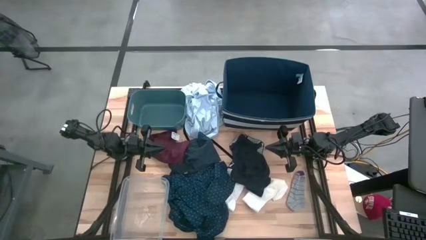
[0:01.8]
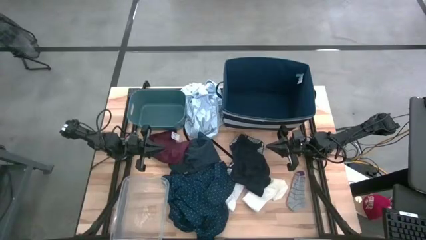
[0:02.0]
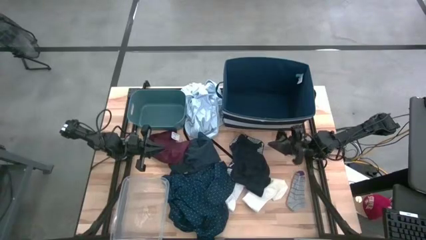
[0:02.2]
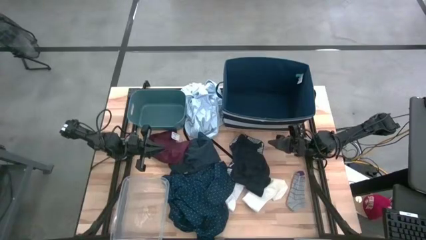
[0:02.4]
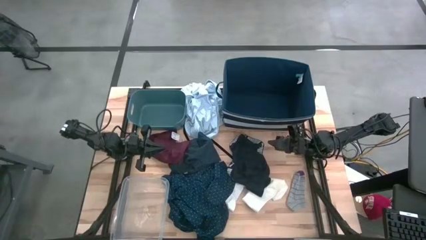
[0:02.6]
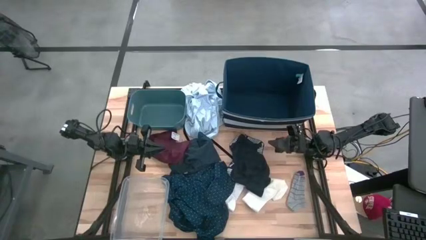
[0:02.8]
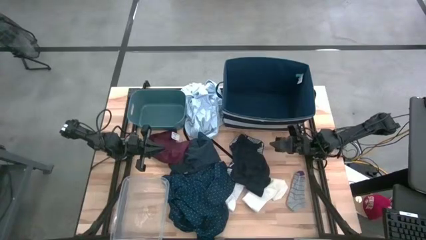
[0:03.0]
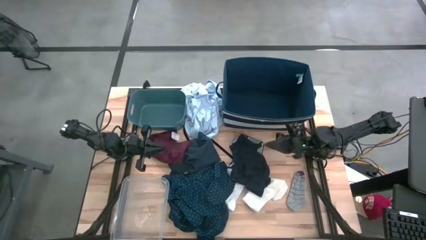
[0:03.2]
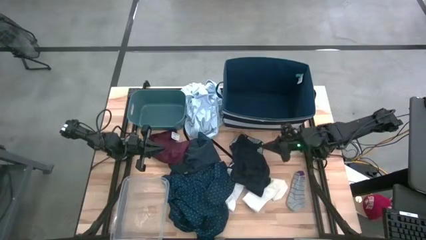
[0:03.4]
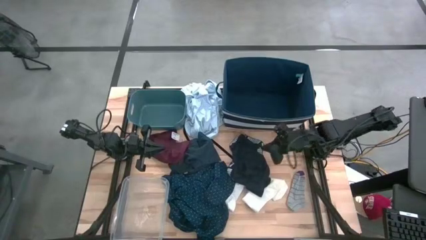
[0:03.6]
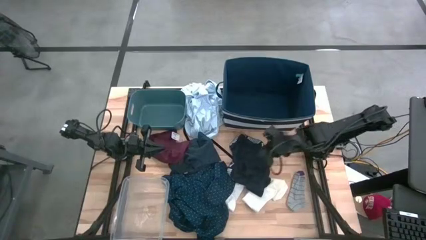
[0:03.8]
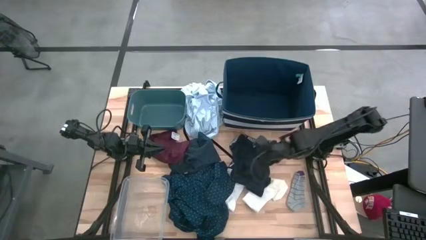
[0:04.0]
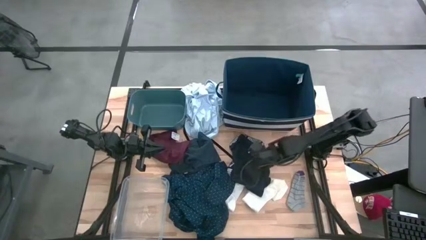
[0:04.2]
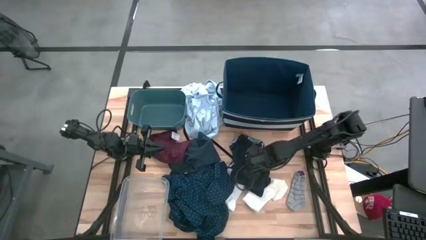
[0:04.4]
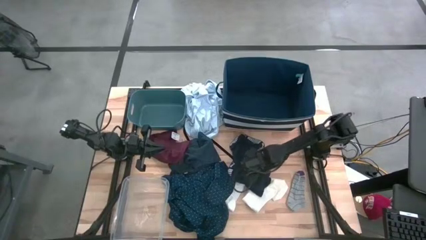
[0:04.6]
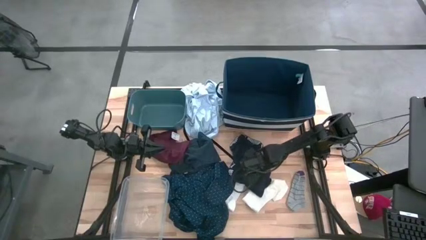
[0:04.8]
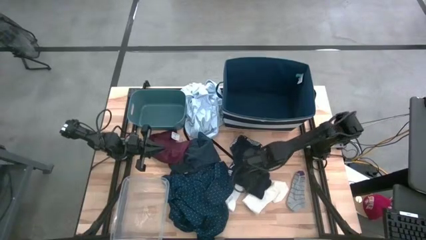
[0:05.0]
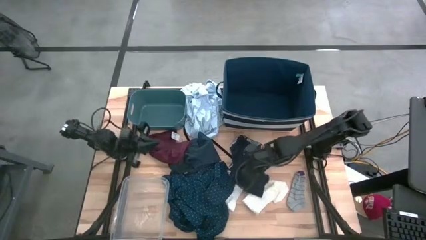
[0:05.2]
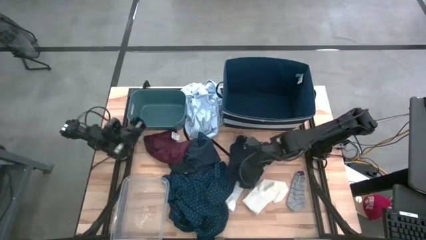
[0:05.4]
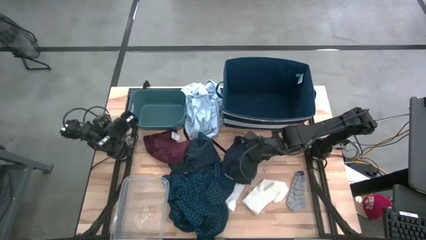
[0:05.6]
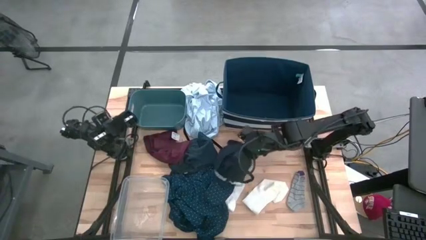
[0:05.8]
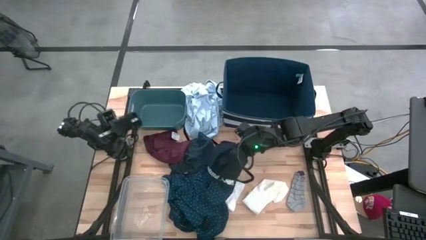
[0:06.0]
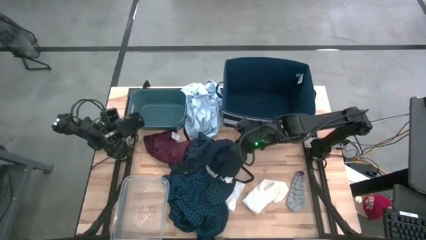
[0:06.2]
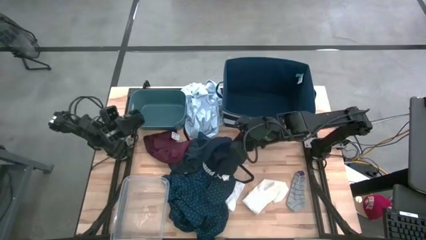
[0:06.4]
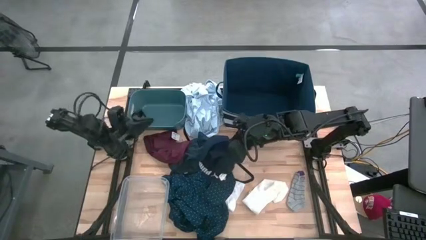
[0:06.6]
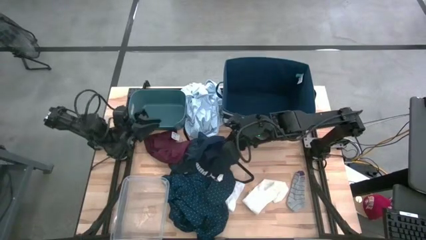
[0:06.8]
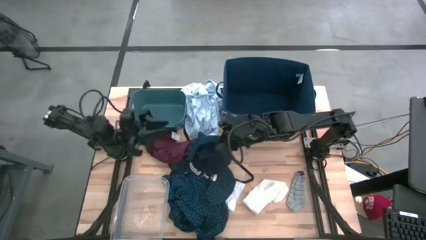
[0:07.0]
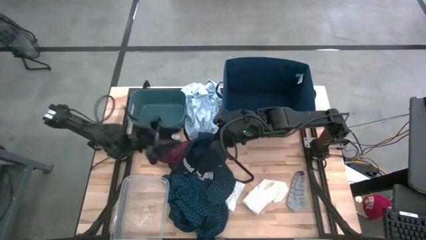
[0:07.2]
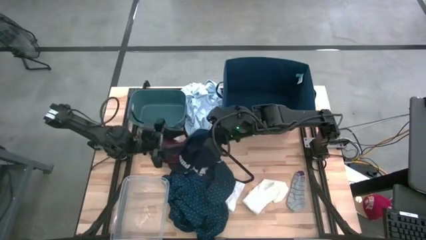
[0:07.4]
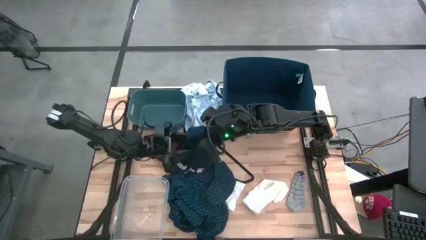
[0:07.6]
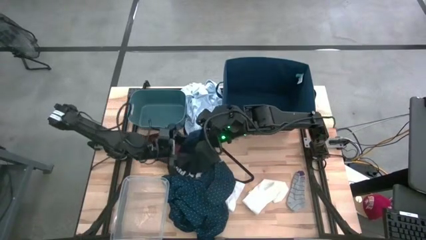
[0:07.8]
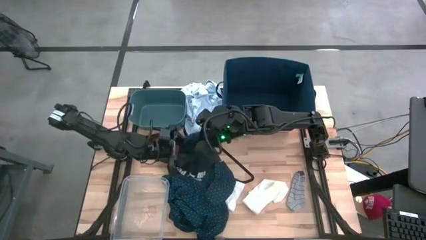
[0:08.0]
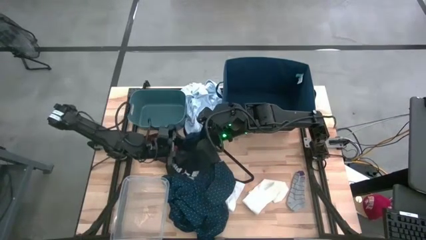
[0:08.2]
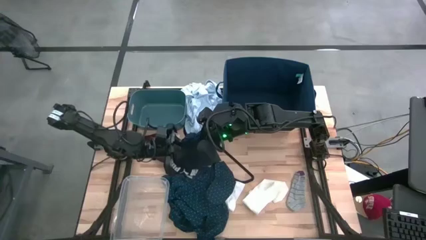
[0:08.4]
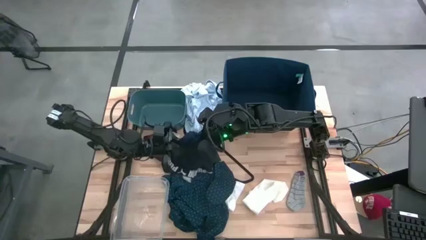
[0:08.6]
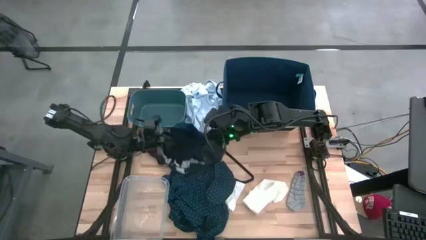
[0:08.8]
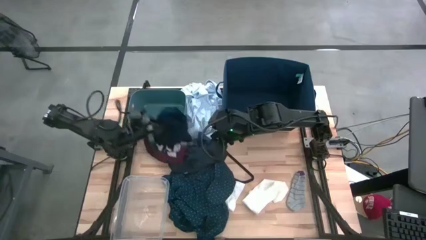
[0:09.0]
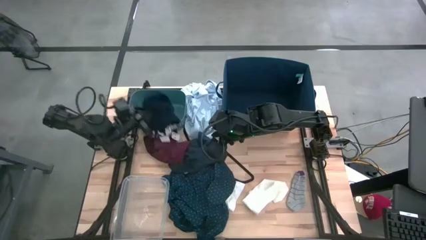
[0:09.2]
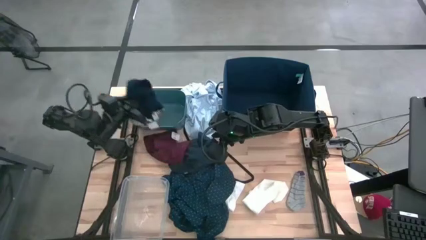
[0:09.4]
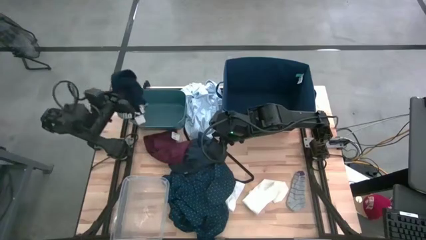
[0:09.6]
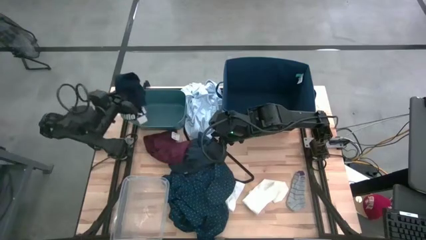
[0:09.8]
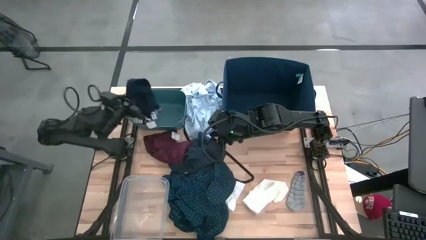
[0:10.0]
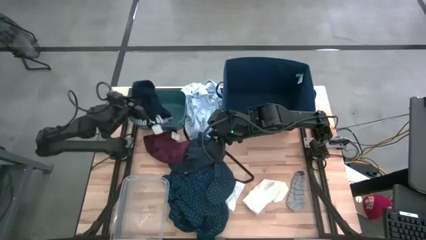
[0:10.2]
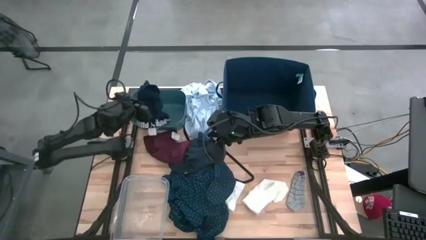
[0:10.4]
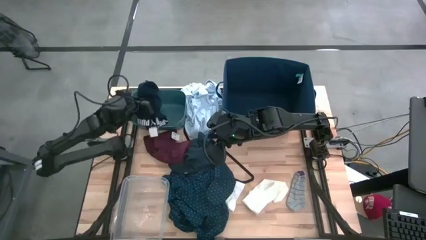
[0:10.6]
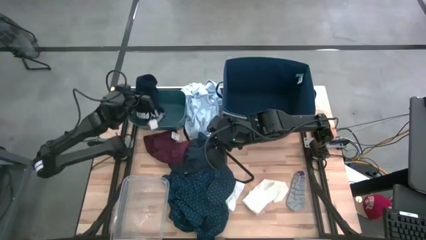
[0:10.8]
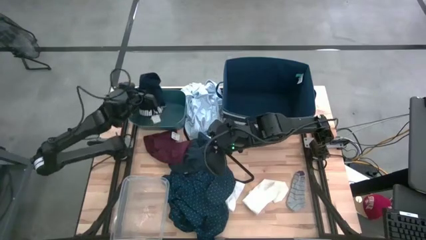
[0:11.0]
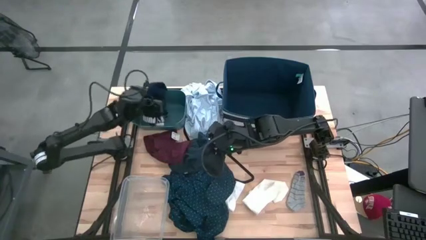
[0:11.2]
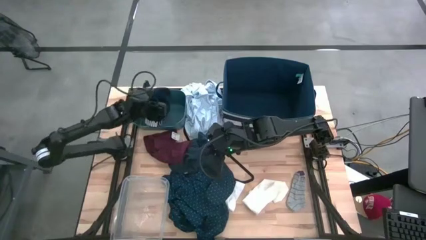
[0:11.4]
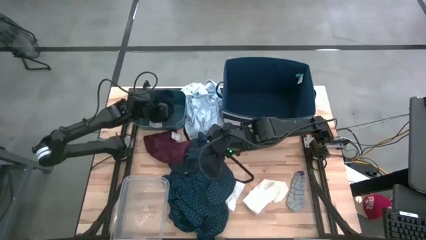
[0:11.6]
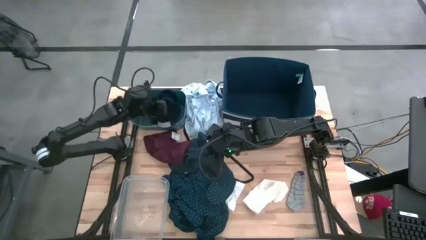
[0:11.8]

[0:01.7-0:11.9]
Task: Pick & Place Cloths
Put the dark blue boxers into the green bin

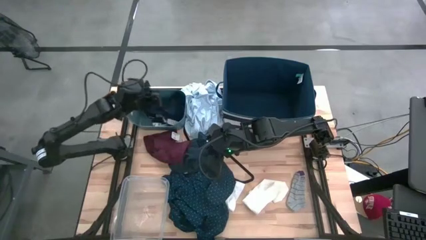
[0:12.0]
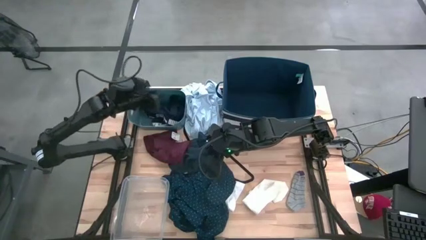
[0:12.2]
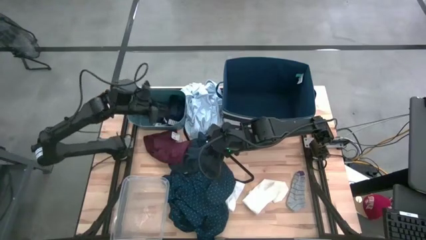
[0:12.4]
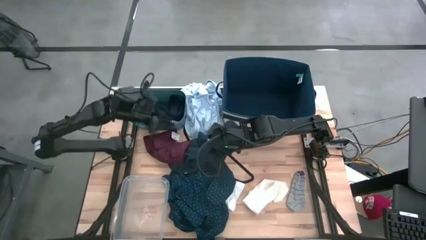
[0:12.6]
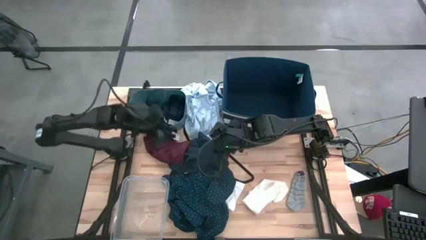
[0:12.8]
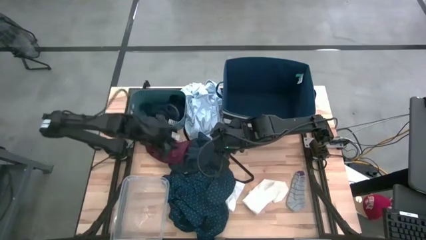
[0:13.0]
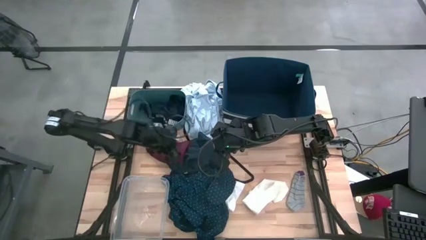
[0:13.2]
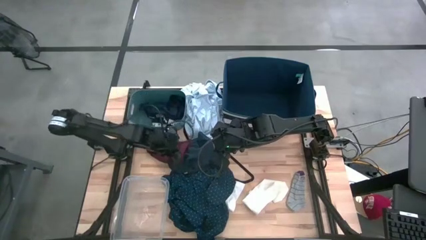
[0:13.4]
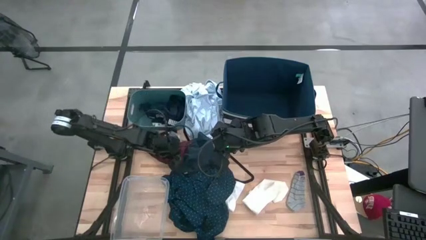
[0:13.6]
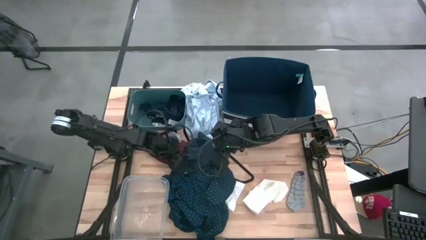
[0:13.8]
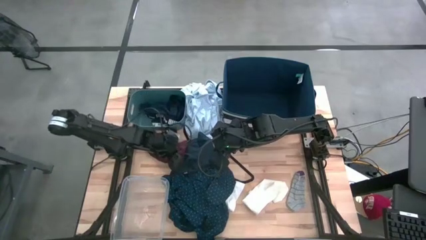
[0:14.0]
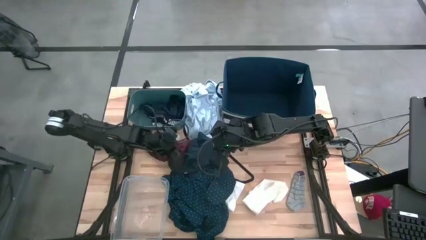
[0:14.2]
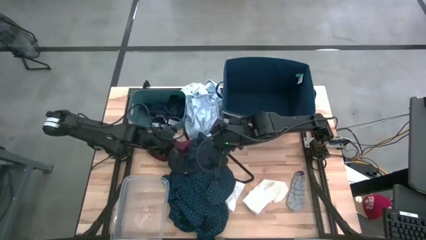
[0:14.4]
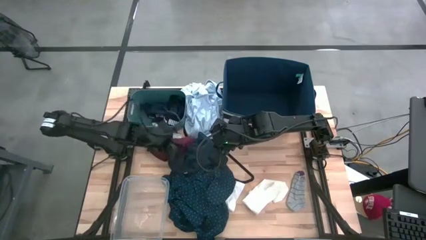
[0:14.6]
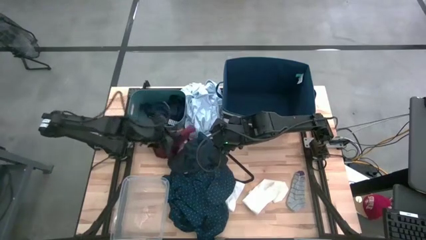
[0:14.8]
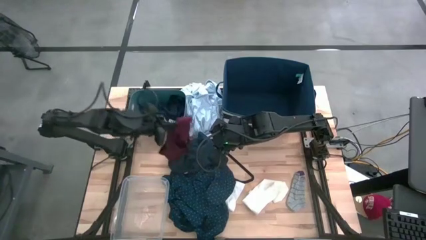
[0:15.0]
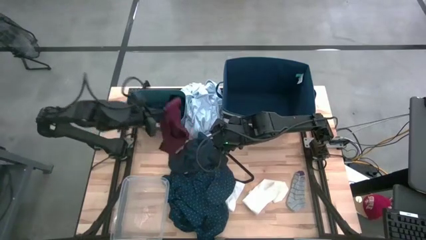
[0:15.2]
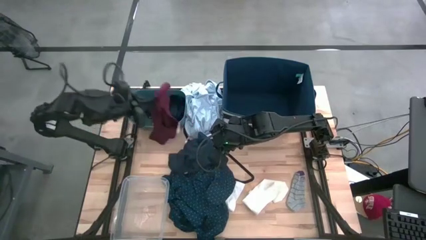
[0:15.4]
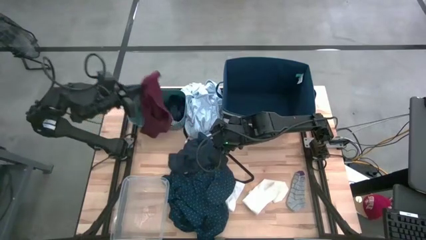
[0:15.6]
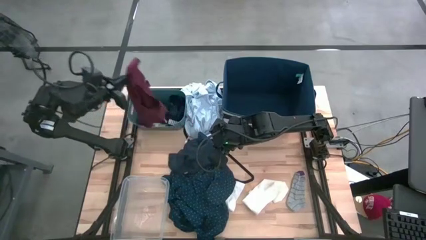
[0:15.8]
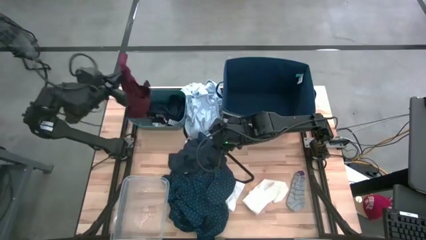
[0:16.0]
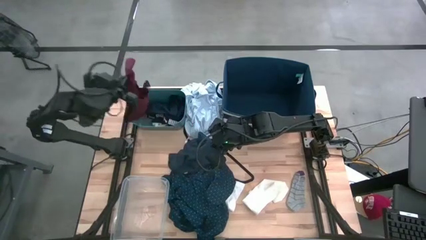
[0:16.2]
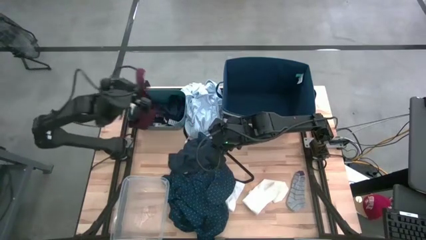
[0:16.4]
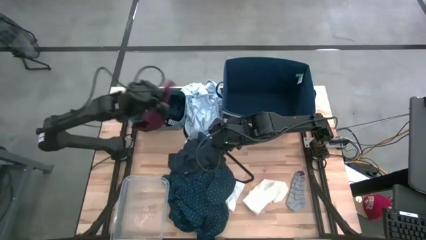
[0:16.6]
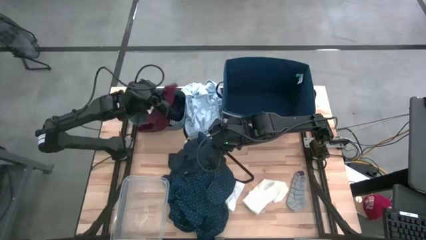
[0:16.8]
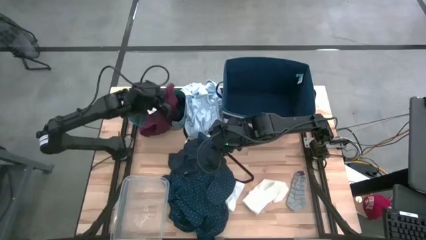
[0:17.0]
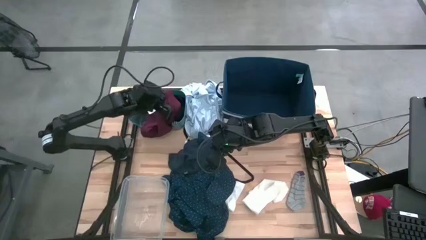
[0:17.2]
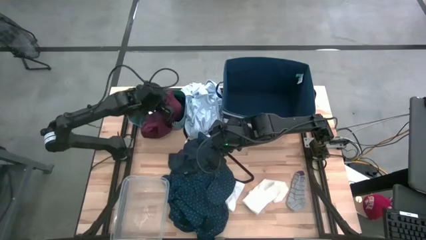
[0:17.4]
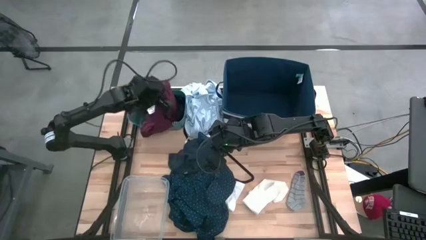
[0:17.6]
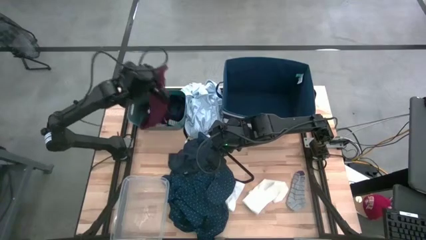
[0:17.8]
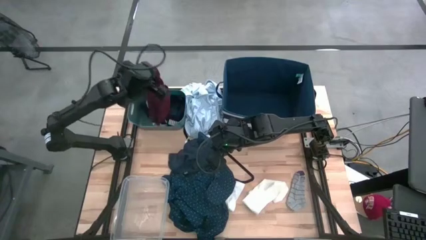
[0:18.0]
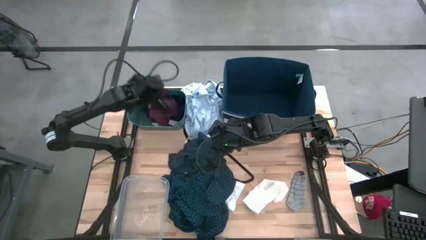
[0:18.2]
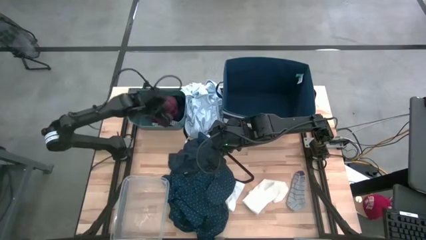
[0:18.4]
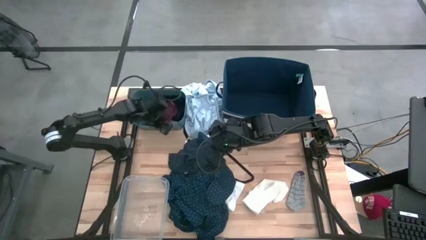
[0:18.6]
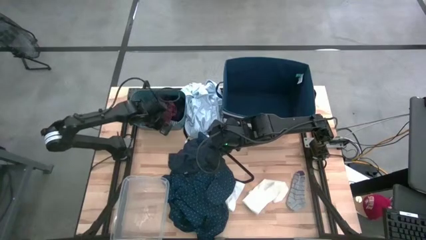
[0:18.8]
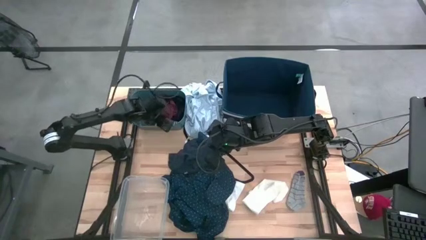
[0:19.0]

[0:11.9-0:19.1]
Put the red underwear into the green bin
